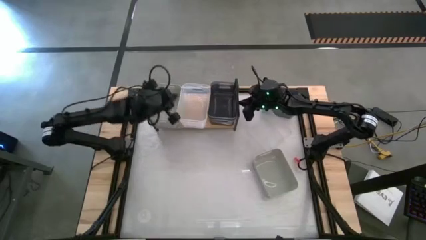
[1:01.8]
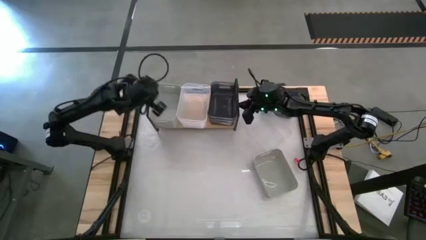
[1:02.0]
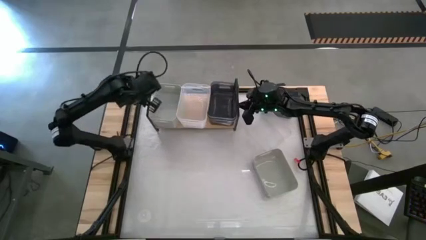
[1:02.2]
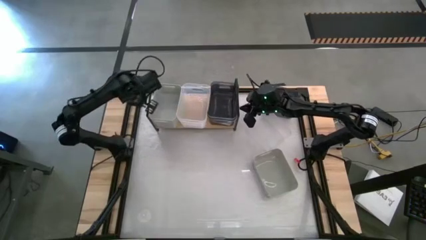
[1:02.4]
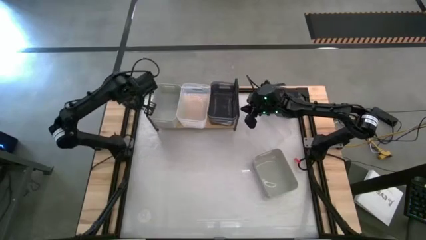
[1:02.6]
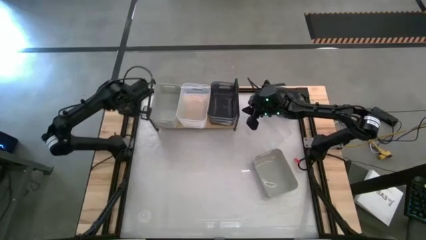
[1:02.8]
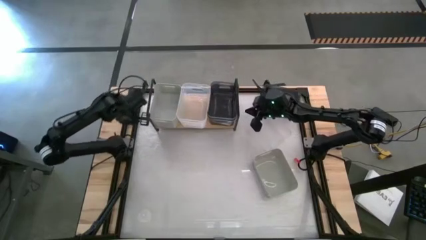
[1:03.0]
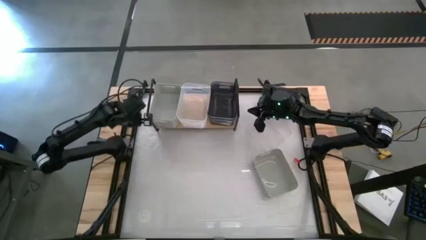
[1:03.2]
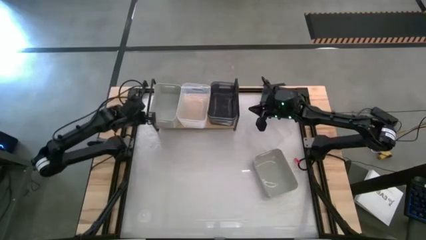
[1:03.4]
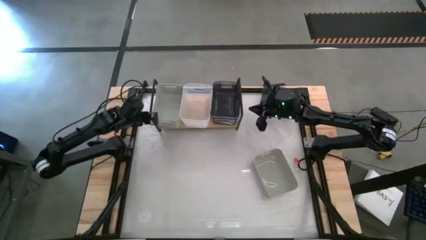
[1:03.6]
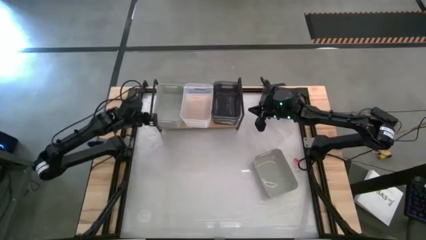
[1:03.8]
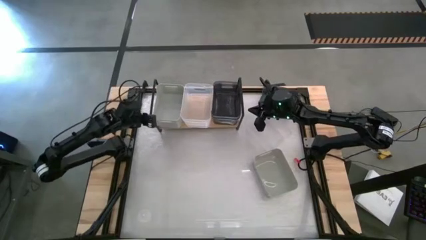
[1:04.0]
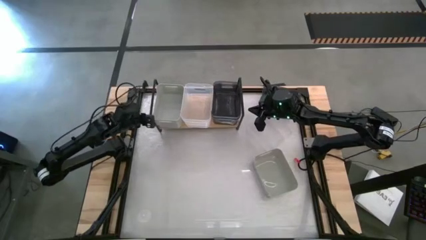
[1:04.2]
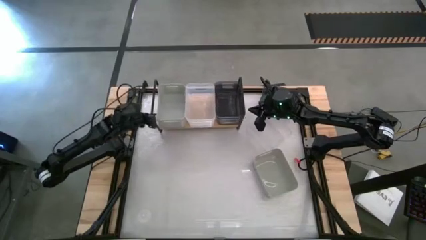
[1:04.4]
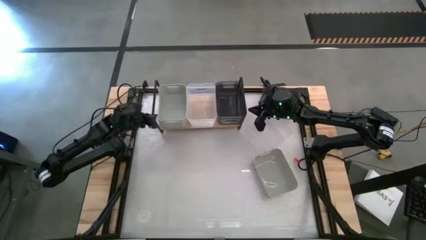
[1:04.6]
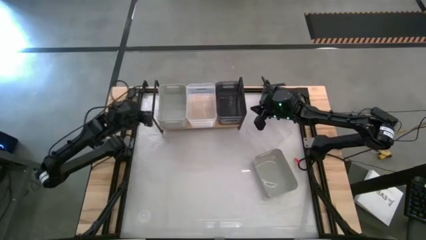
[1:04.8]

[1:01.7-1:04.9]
Task: Stack baskets on shelf by color
Adjust the shelf

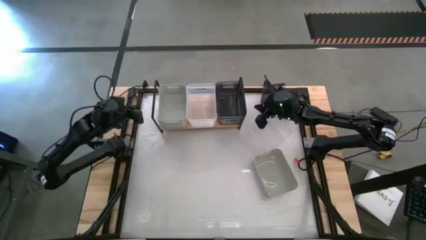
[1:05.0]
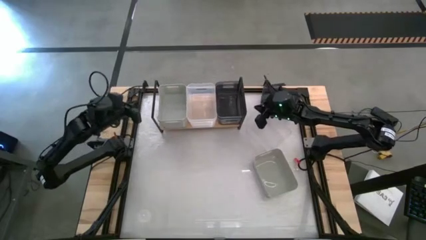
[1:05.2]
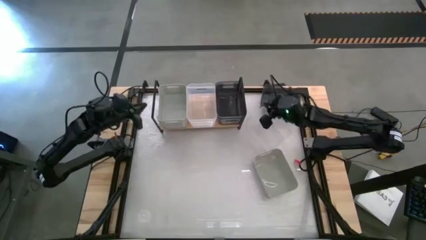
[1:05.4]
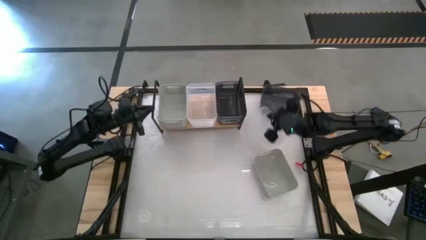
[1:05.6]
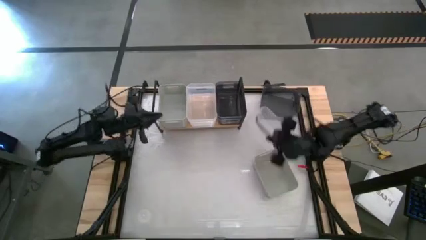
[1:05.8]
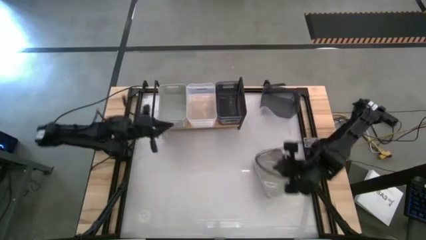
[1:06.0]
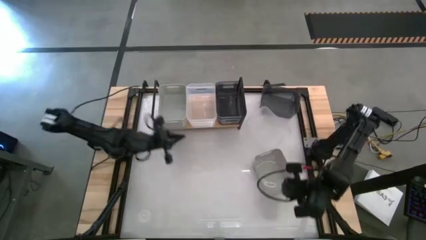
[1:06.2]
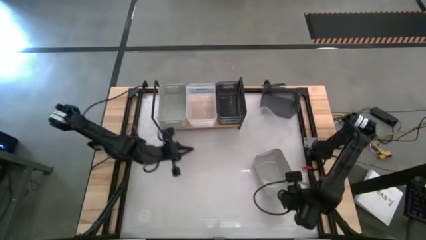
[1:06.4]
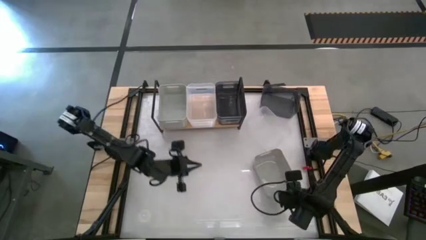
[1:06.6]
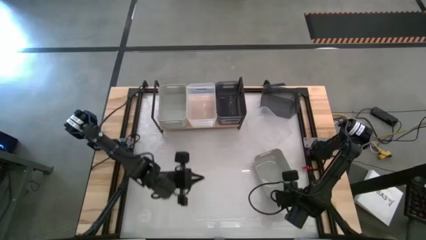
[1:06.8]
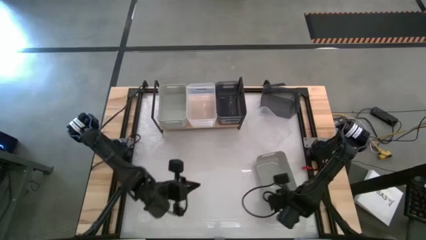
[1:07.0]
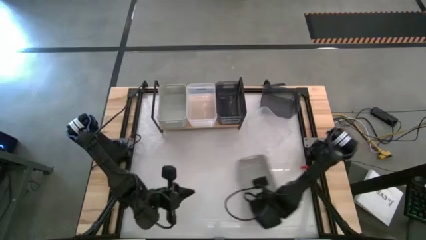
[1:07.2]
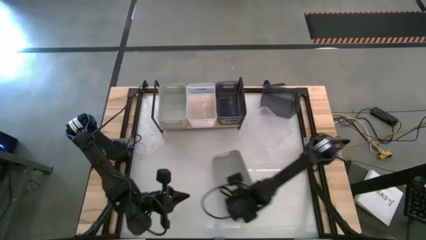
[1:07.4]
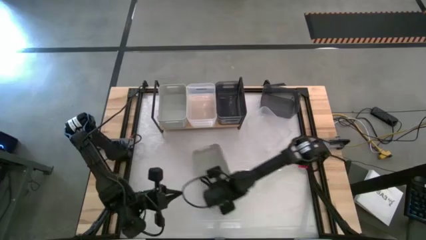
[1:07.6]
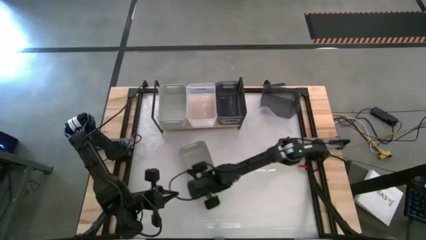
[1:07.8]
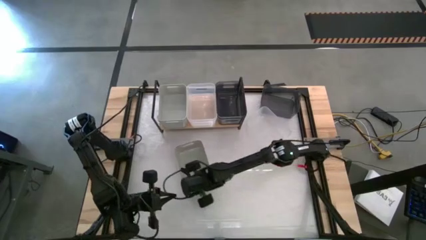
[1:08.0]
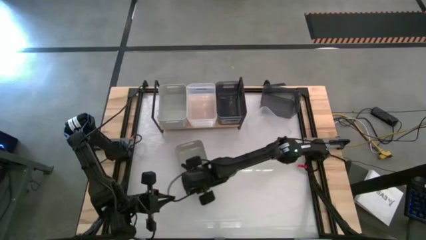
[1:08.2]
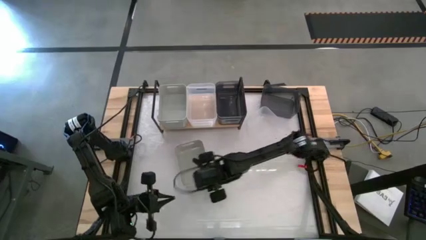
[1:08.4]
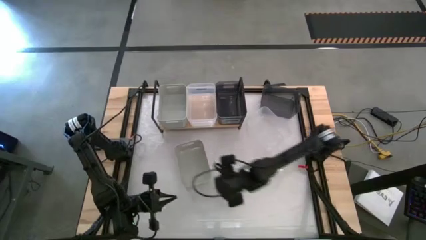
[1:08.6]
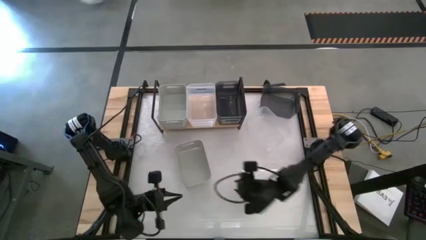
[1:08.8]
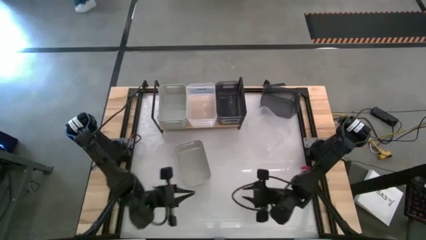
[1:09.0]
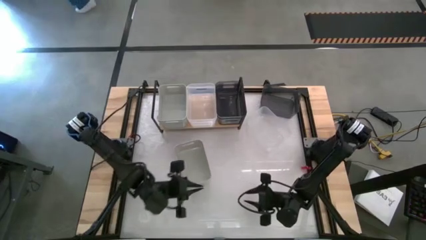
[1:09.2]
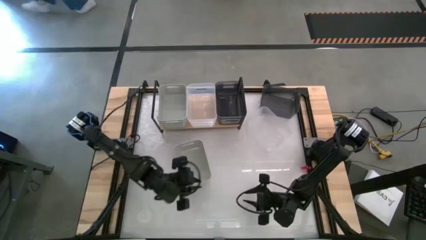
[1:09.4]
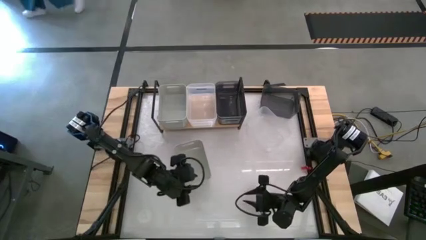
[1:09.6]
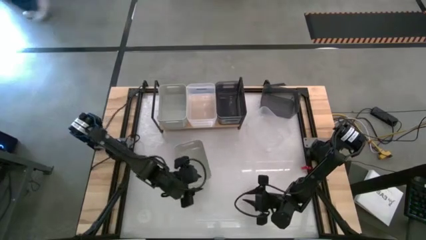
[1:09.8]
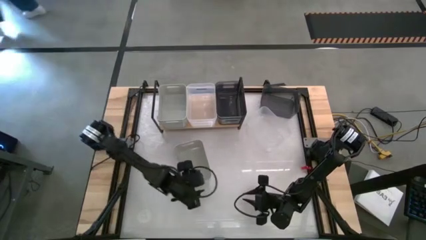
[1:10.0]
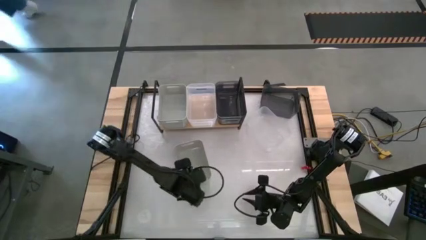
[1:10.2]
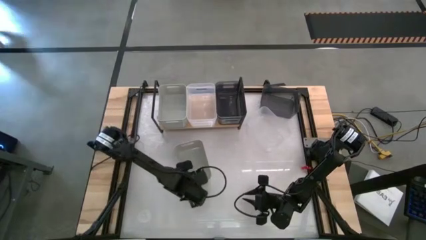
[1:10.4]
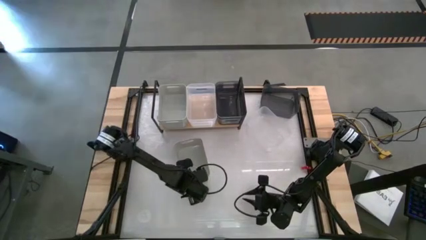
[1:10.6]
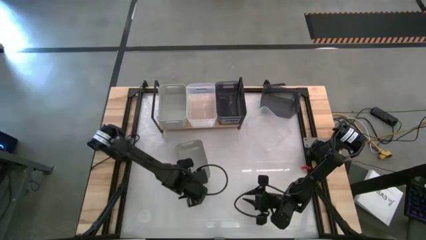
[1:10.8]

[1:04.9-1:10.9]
Stack the gray bin on top of the other gray bin on the shelf

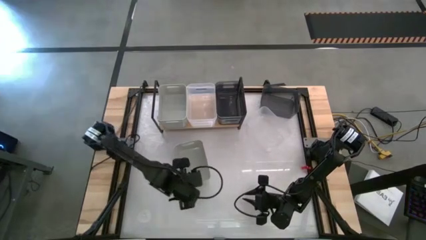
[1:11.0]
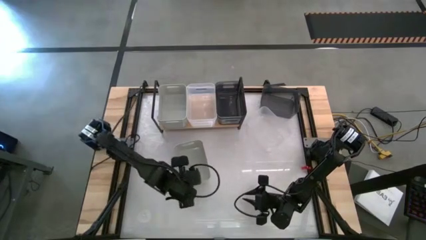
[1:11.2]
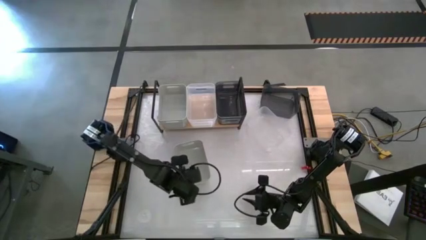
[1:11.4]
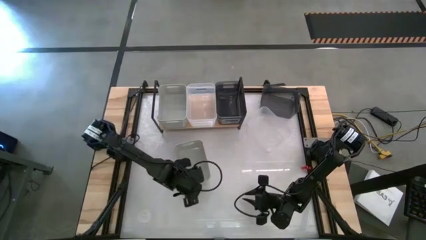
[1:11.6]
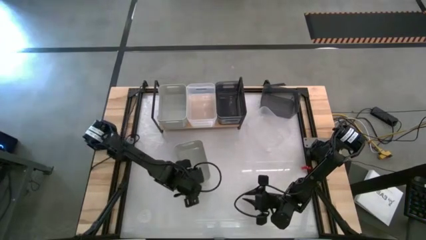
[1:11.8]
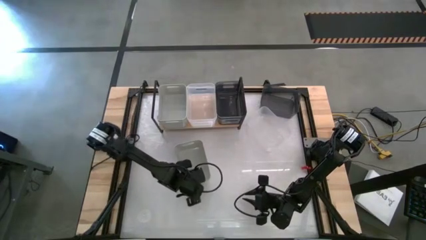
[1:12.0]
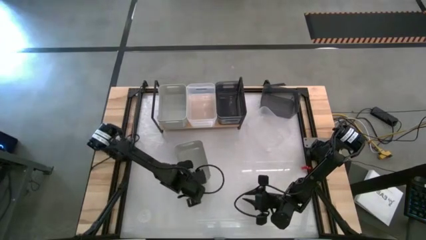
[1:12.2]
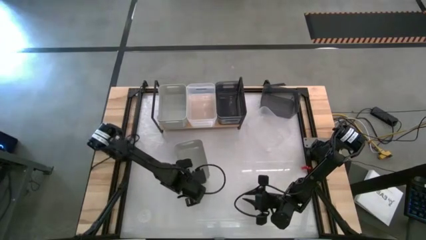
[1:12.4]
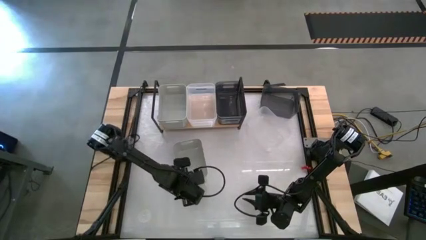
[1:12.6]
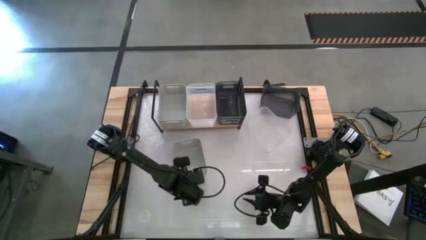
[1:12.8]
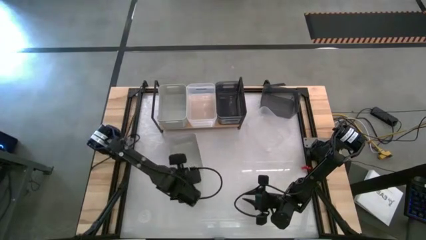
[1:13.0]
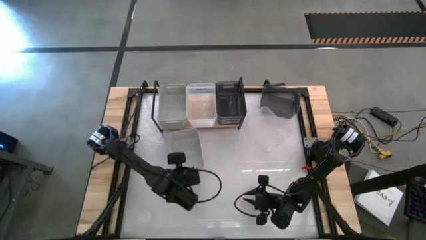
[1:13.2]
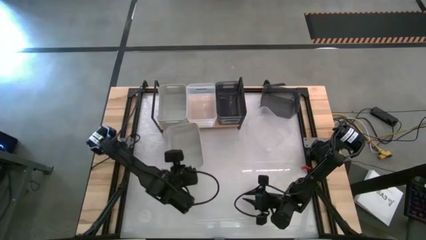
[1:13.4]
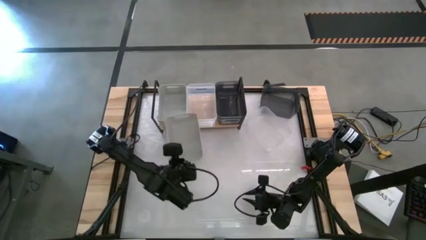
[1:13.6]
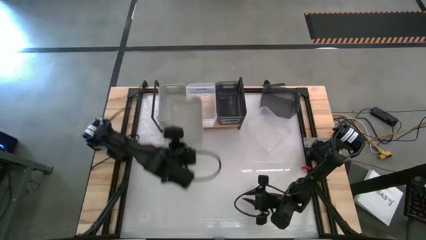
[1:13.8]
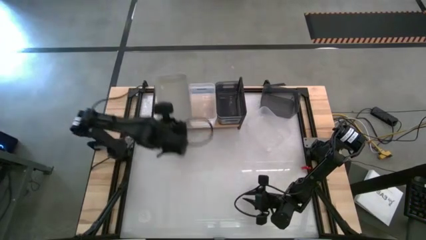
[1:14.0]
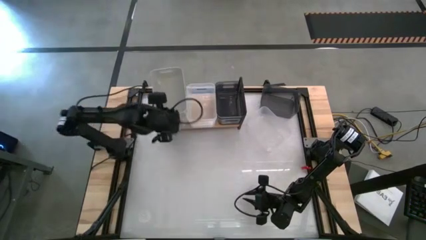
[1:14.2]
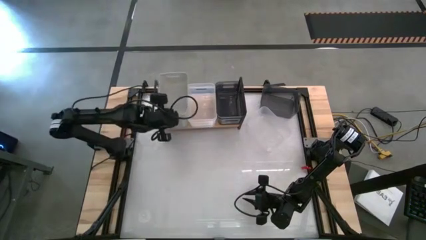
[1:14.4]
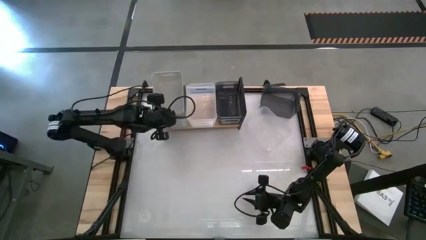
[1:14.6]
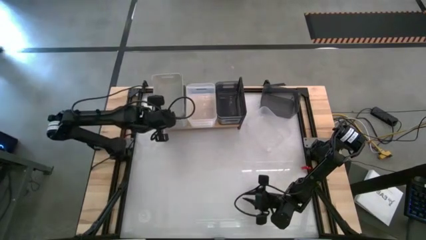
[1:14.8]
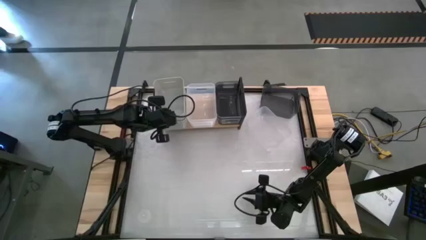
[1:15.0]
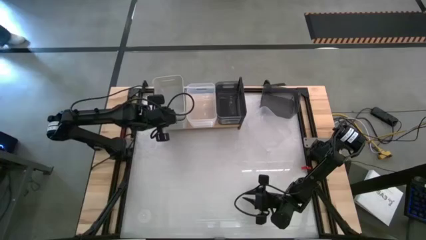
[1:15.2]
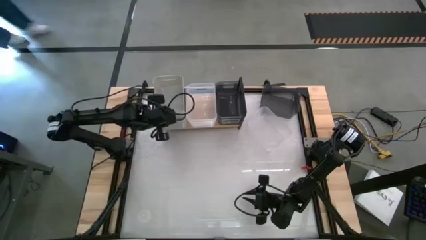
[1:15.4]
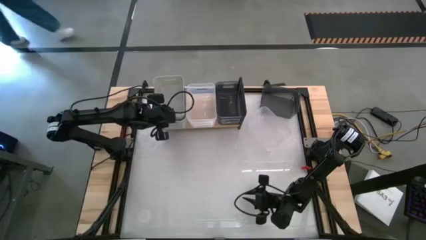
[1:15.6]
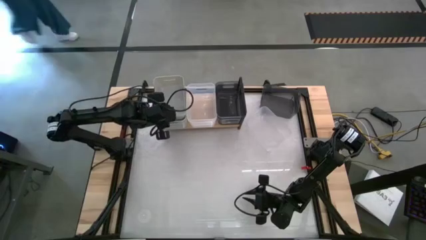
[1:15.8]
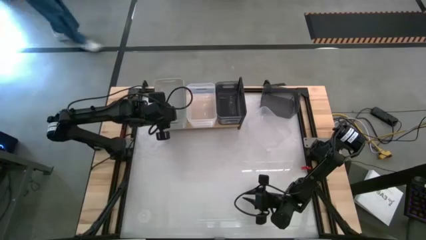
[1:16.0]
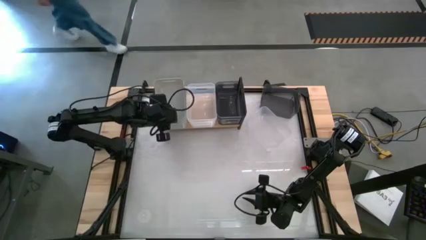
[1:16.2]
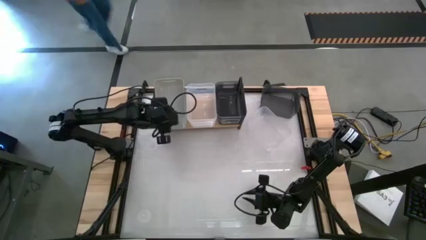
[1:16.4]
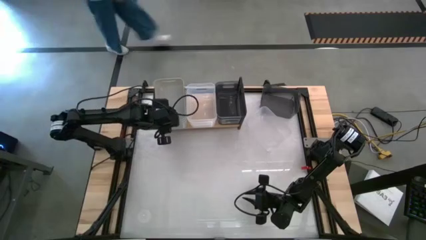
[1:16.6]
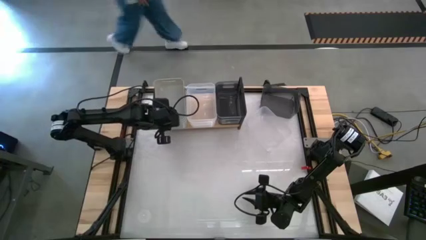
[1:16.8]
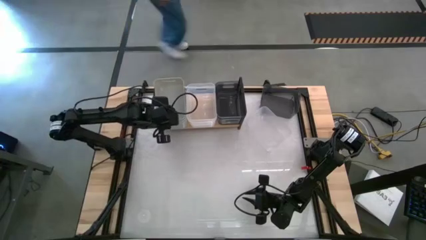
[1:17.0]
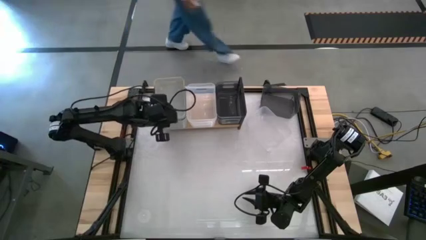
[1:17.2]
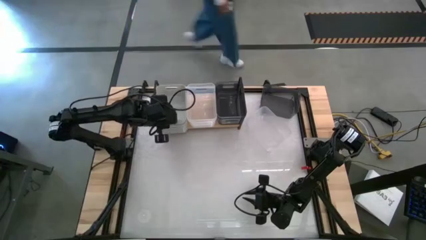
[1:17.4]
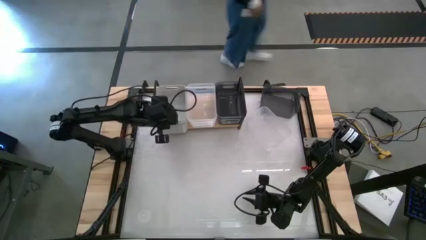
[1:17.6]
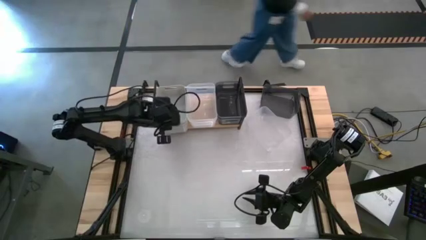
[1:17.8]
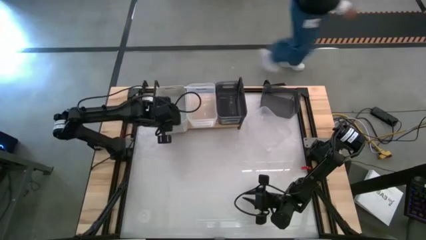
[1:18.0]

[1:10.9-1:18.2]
Stack the gray bin on top of the other gray bin on the shelf
